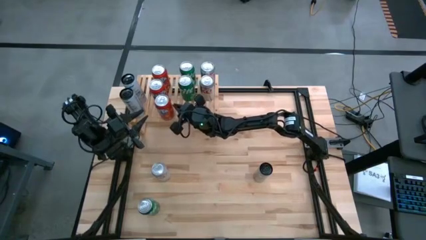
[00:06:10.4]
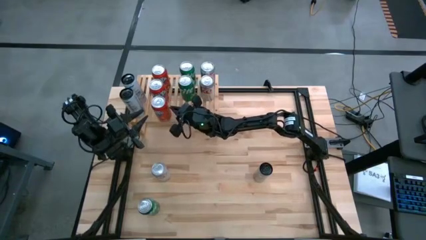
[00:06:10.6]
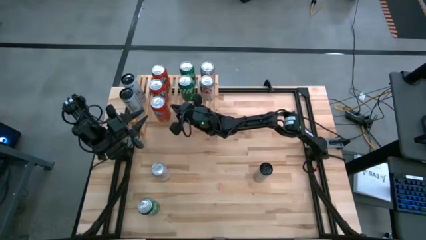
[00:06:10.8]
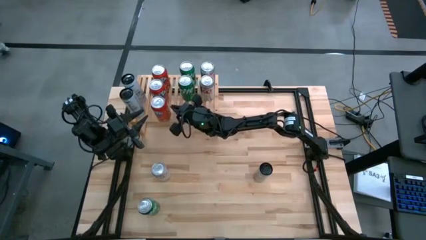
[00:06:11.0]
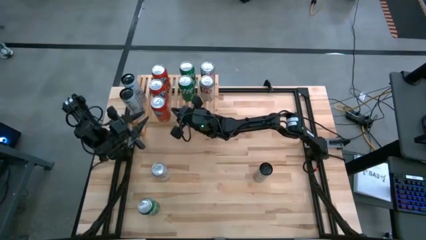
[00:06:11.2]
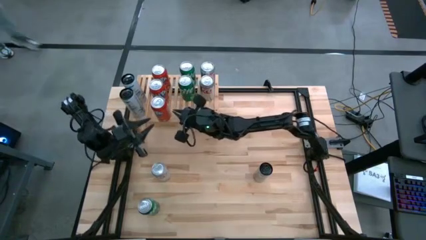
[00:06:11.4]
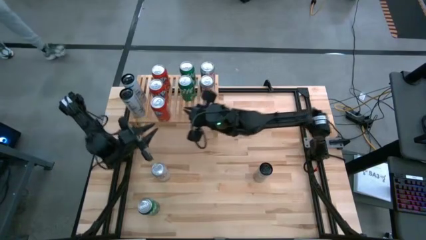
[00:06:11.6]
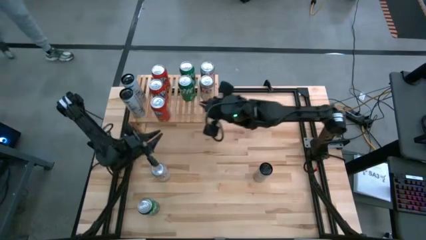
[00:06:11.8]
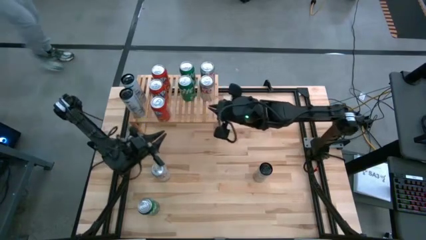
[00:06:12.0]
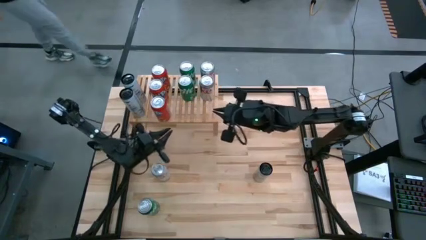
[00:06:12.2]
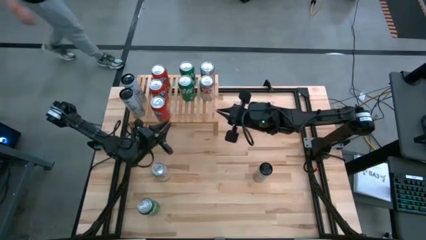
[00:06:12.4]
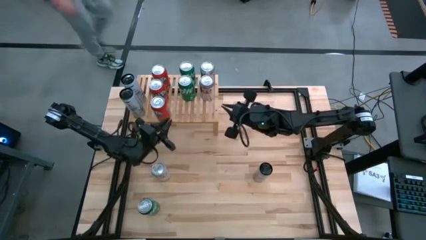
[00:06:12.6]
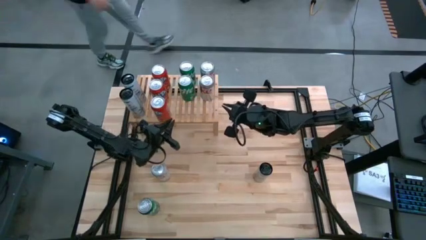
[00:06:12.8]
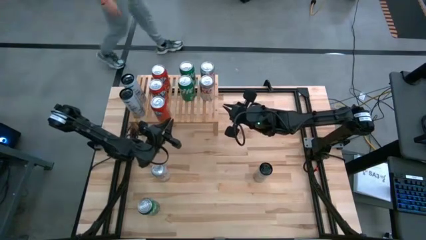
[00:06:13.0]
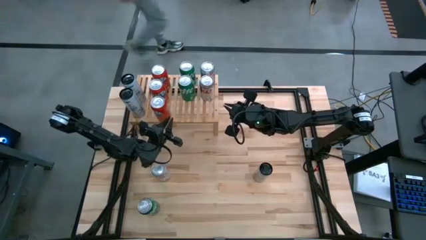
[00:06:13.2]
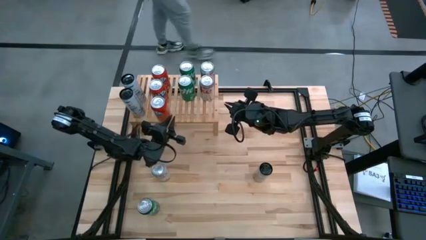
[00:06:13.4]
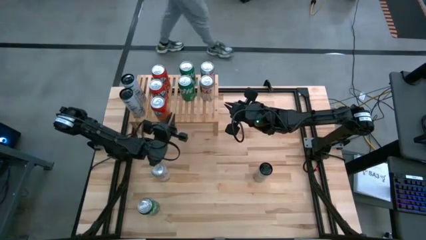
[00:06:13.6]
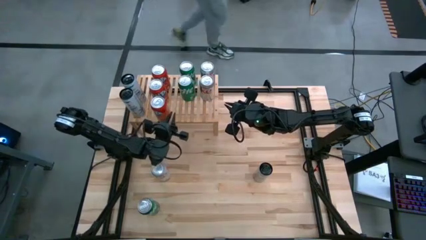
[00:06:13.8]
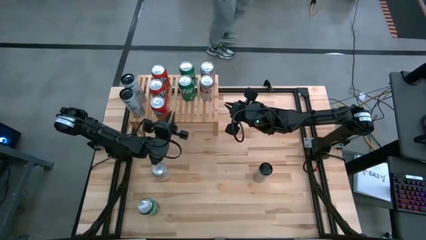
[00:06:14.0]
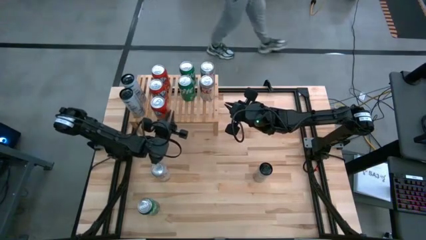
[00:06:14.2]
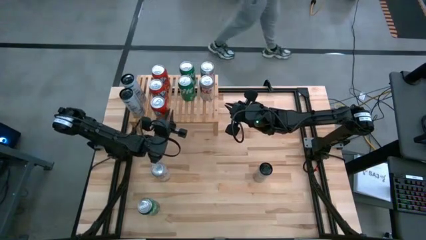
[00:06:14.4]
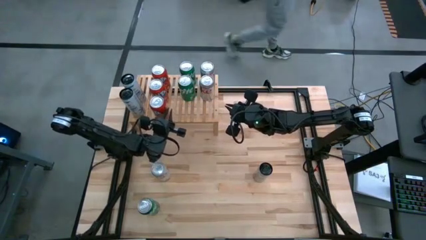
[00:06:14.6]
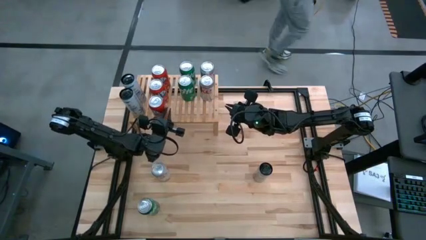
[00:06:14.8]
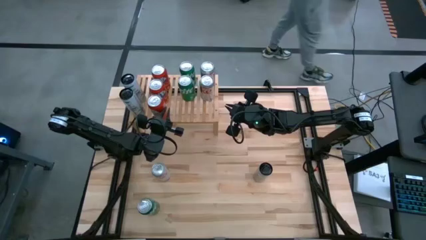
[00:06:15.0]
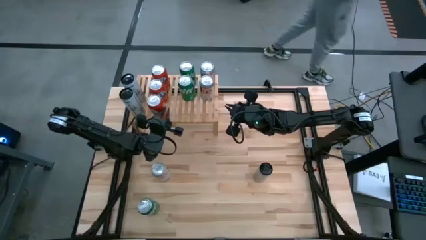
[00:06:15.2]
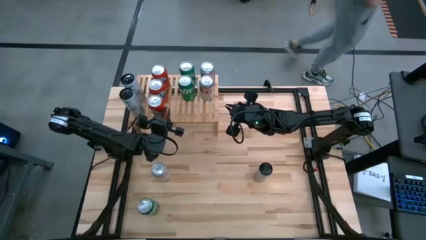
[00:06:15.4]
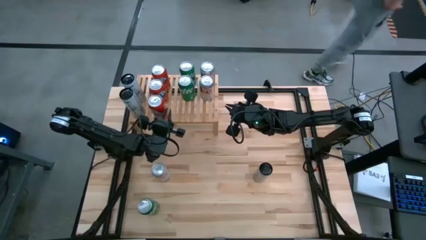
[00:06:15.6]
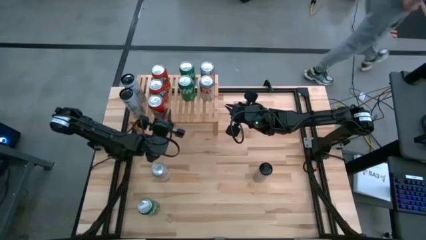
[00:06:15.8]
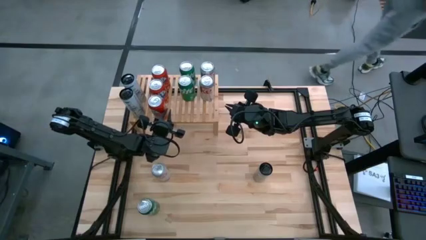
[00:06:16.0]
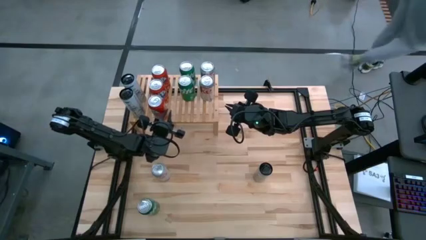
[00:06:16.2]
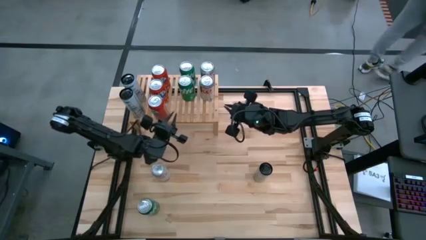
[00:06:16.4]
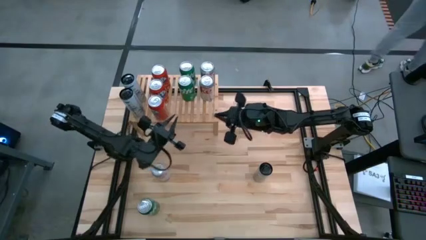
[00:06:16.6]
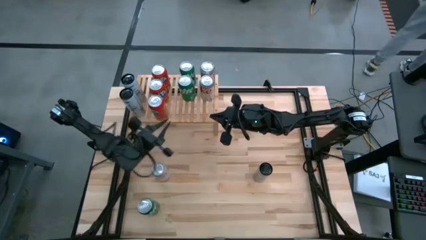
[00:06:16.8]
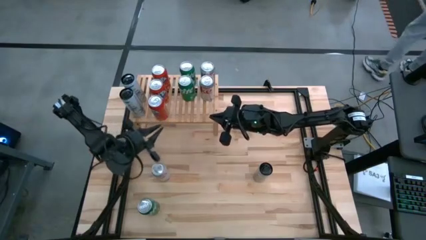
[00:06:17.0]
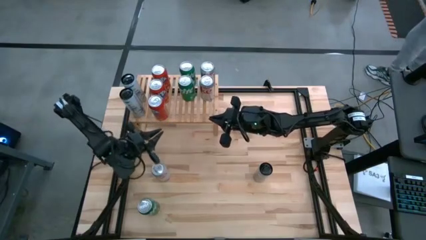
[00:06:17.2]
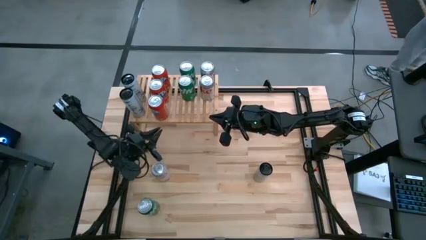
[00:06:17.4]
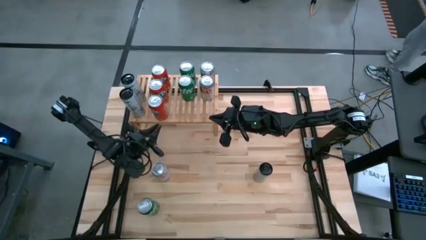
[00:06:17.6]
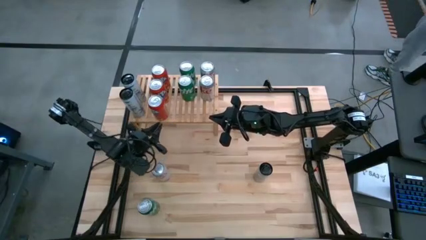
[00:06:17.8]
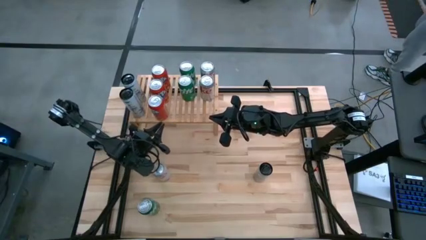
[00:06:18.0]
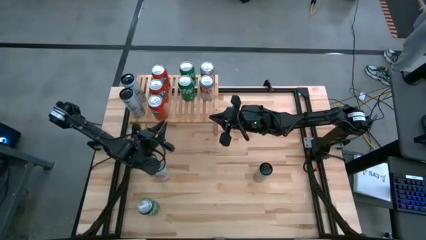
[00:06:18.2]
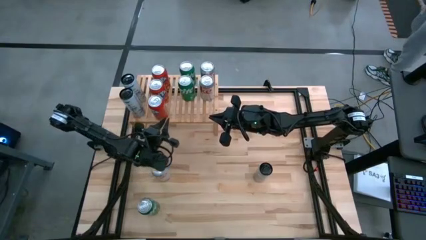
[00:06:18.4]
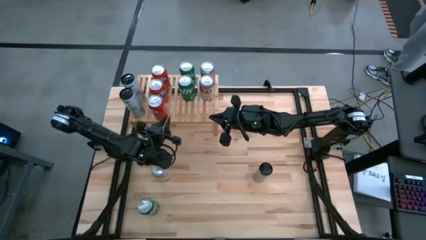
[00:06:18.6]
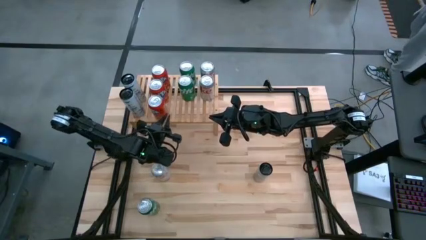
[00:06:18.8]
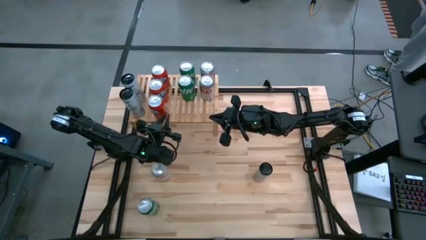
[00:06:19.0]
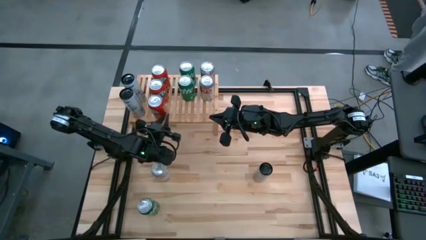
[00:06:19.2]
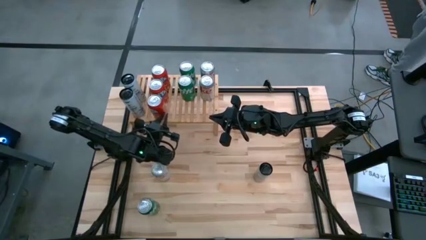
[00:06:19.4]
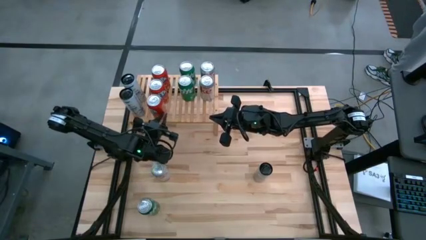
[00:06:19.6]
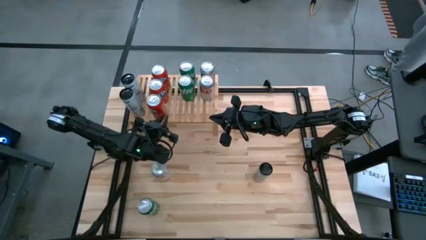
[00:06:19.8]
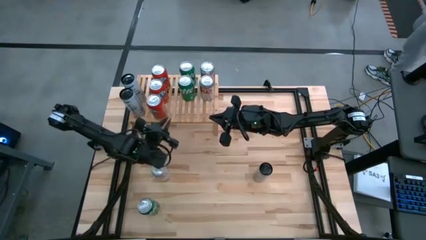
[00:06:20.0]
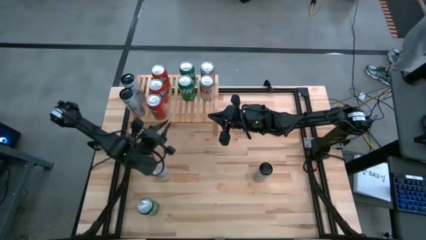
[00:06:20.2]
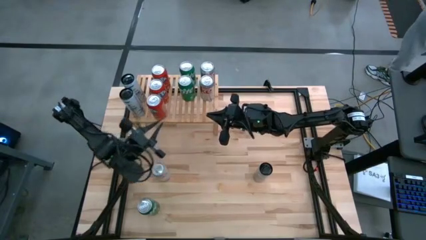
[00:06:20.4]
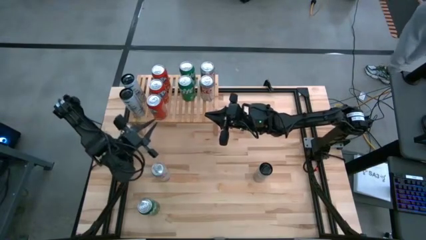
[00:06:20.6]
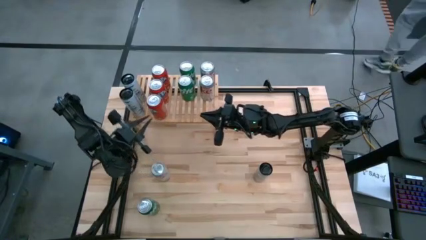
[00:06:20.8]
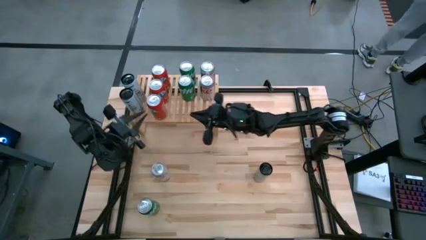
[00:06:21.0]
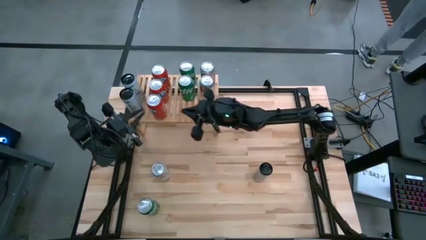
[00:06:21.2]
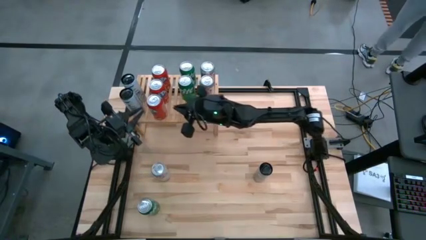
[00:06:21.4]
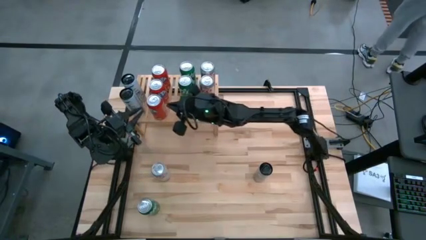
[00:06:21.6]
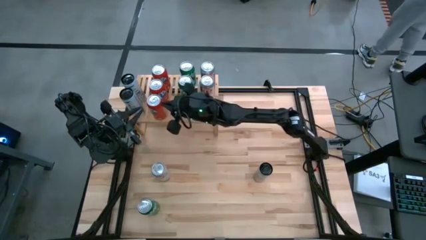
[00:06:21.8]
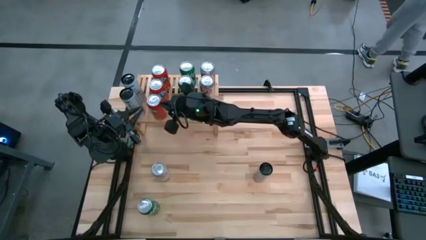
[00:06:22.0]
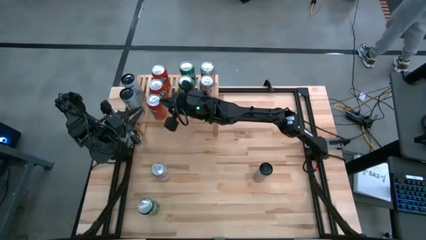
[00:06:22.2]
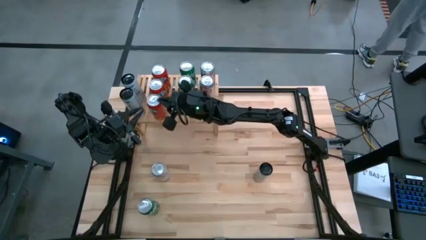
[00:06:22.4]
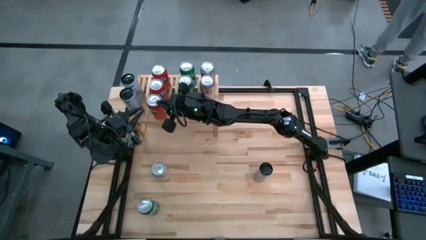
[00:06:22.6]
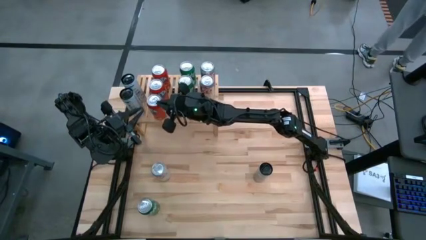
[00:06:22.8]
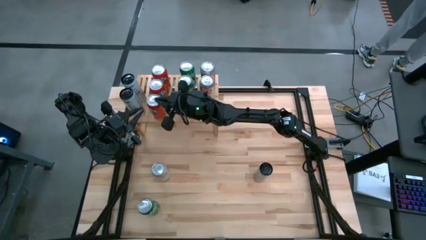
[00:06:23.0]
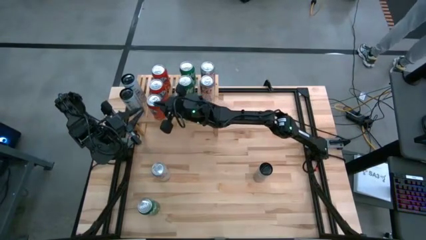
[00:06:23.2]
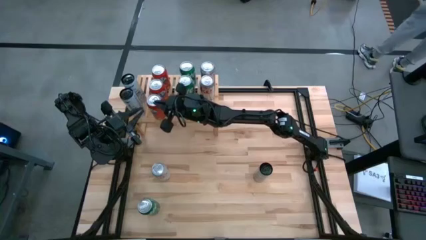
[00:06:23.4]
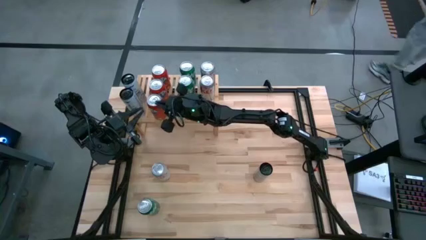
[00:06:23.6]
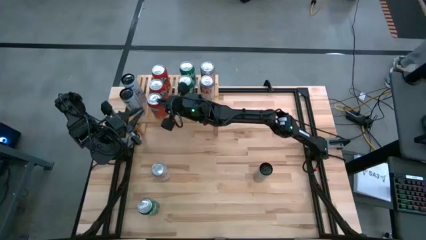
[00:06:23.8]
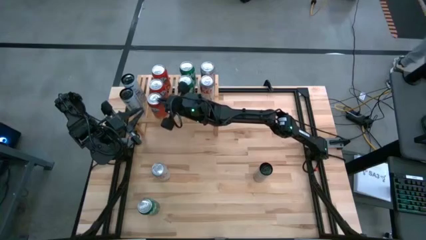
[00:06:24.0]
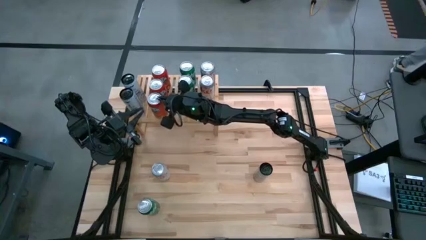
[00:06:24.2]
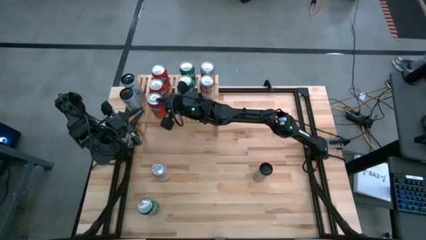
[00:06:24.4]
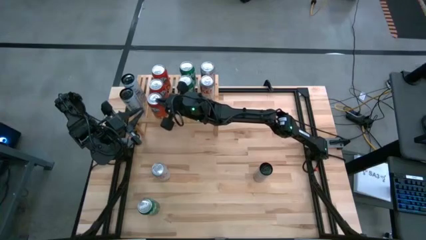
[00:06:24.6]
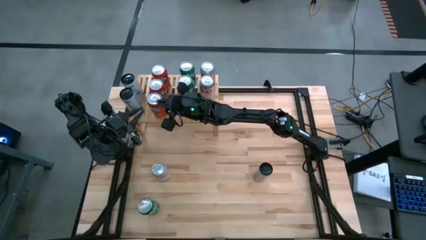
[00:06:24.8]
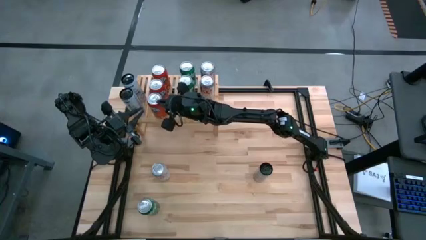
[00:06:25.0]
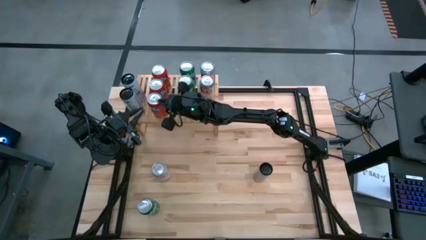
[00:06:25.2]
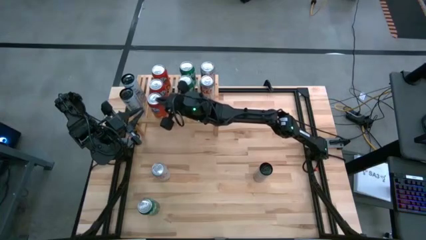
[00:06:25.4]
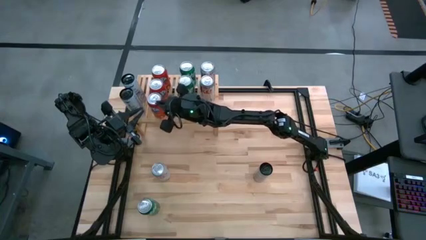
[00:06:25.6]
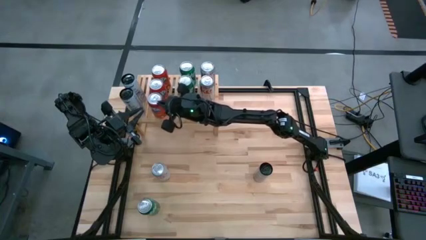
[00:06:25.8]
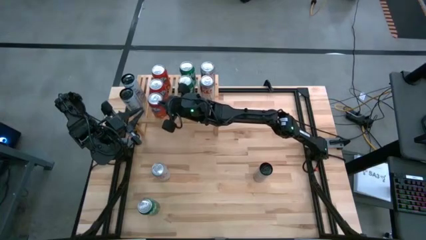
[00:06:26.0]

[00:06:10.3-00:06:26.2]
Task: Place canned beverage on shelf
Put the orange soda can on the shelf aligned with the other orange soda can
